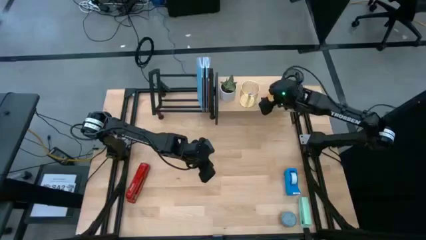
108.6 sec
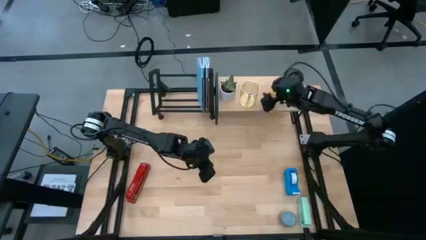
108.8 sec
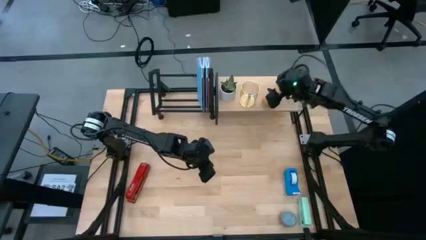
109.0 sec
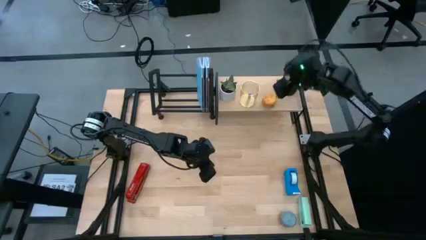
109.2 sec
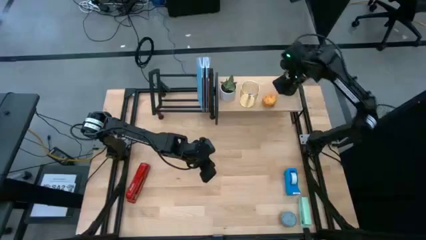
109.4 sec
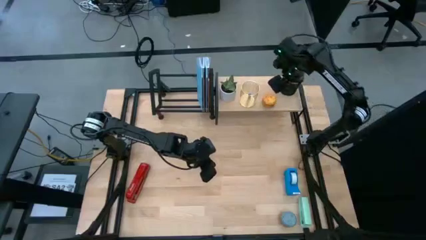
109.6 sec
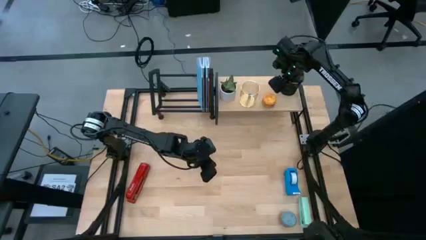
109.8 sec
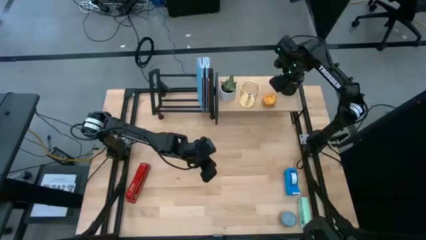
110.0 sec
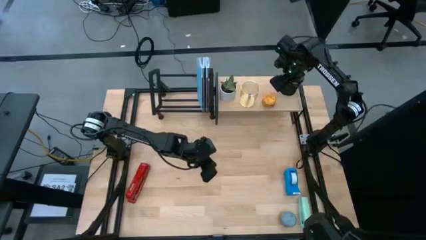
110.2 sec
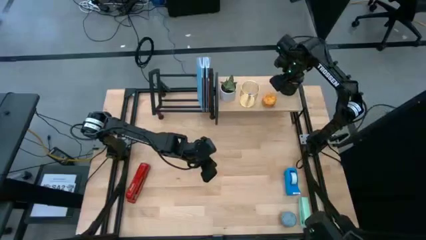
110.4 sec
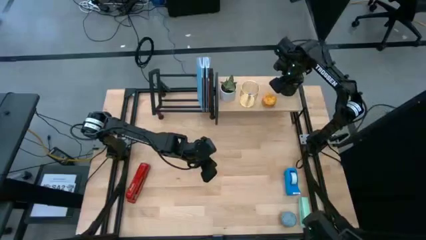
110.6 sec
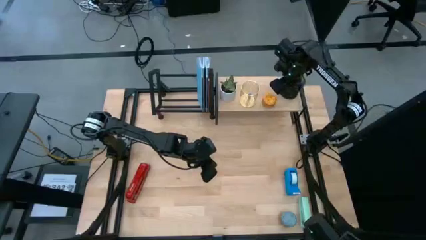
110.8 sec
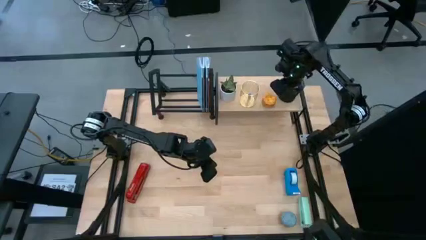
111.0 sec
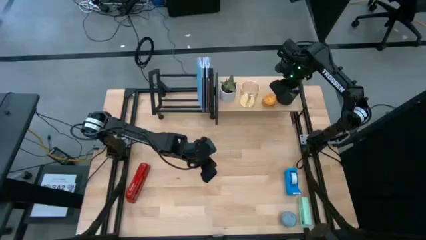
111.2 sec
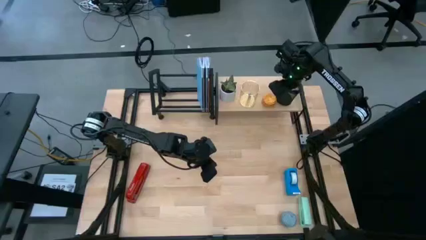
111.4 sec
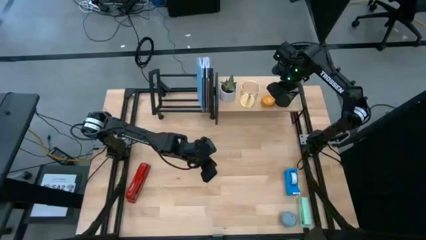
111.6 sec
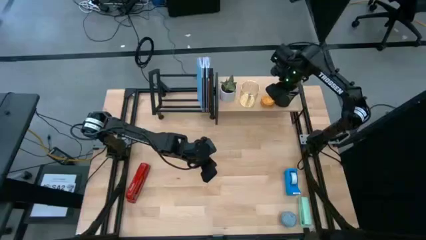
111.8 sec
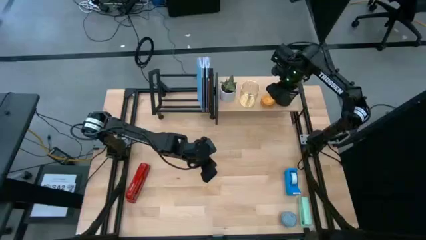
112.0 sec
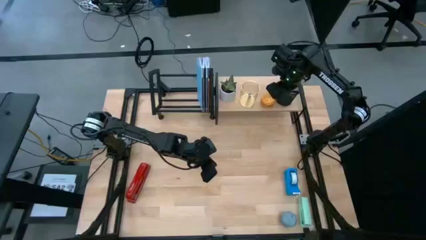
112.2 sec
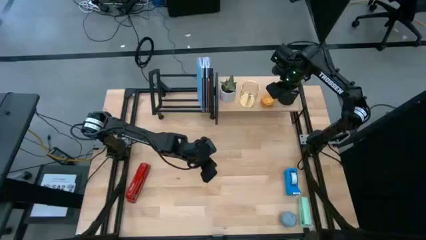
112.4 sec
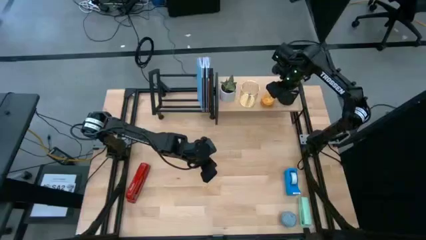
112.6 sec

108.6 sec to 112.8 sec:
Task: Stock shelves
Adjust the black pen organizer

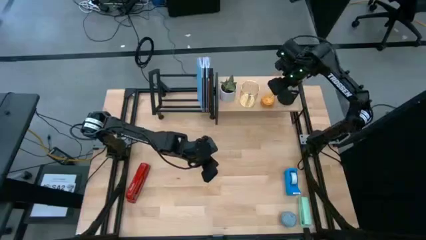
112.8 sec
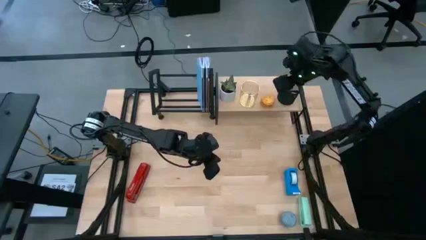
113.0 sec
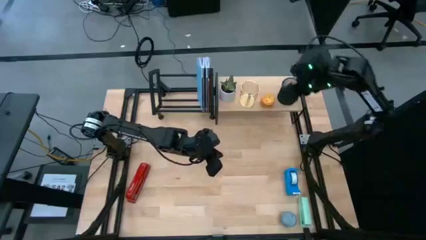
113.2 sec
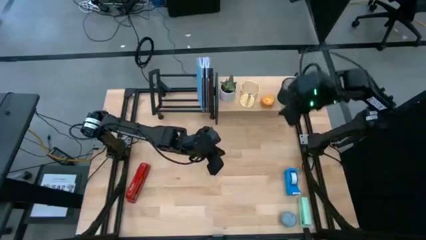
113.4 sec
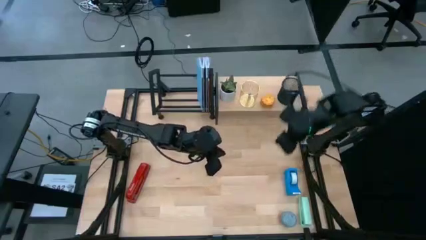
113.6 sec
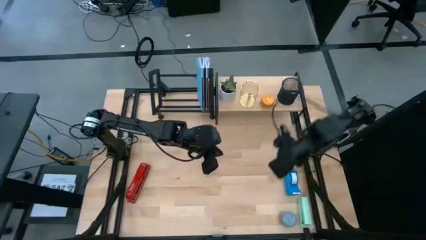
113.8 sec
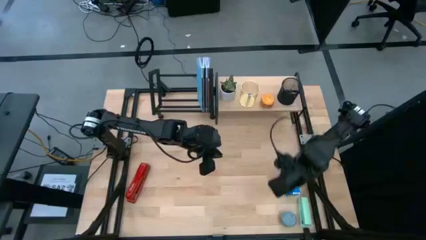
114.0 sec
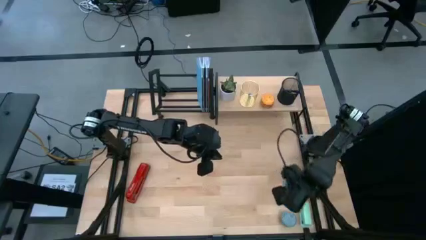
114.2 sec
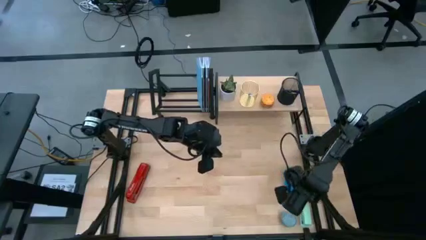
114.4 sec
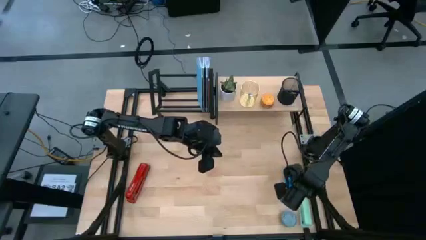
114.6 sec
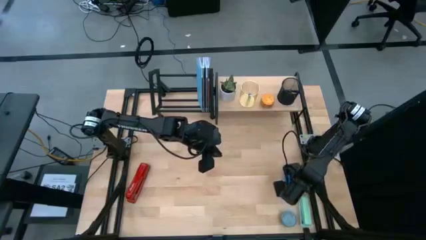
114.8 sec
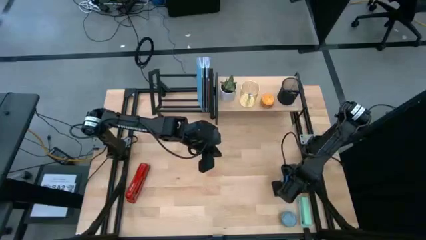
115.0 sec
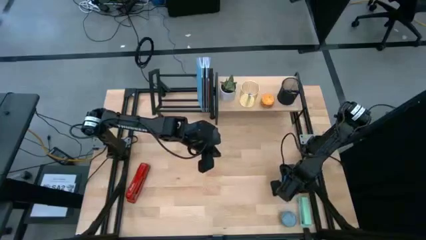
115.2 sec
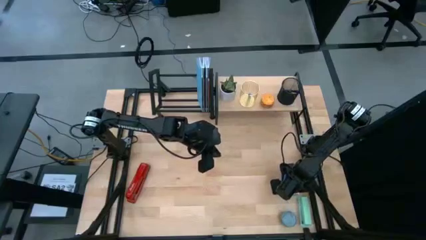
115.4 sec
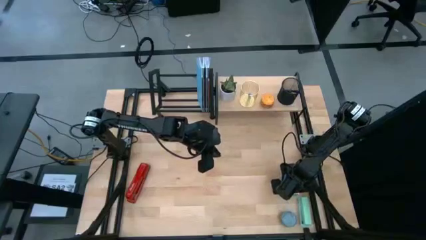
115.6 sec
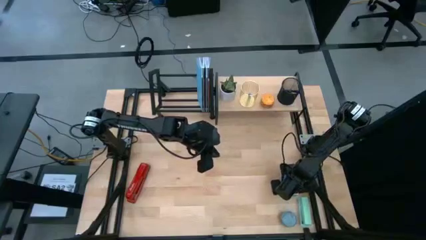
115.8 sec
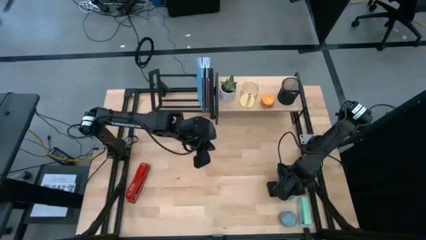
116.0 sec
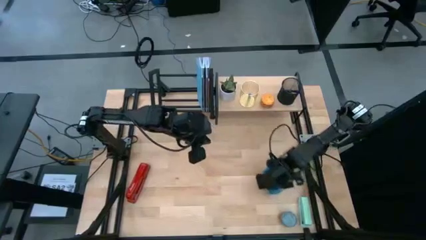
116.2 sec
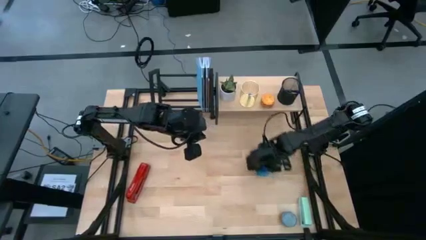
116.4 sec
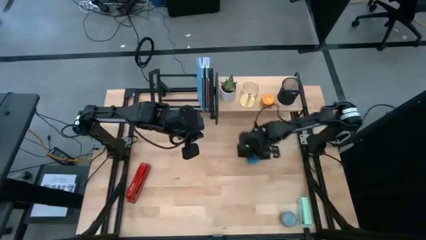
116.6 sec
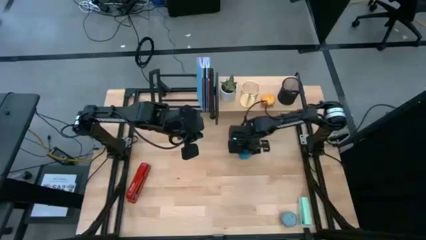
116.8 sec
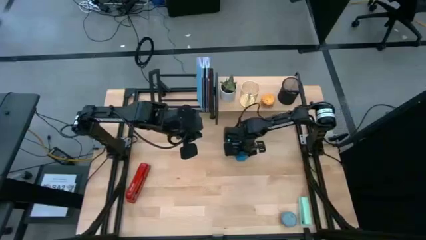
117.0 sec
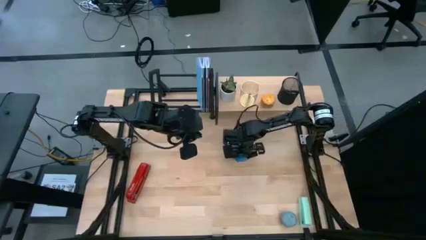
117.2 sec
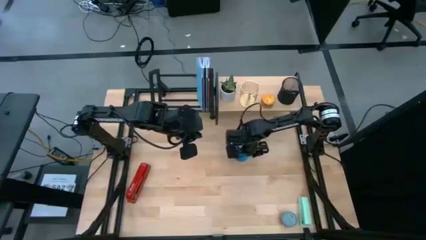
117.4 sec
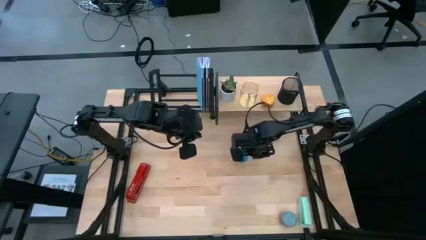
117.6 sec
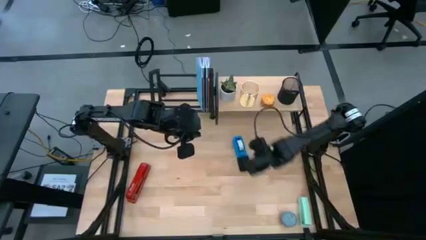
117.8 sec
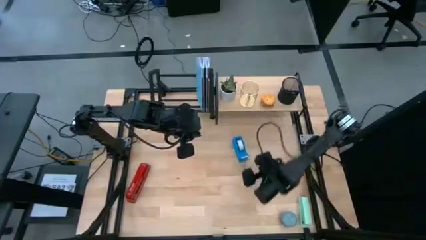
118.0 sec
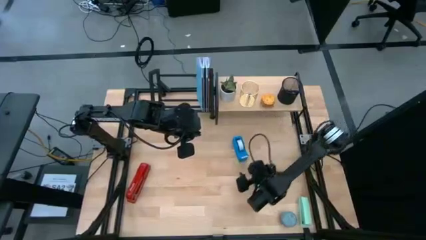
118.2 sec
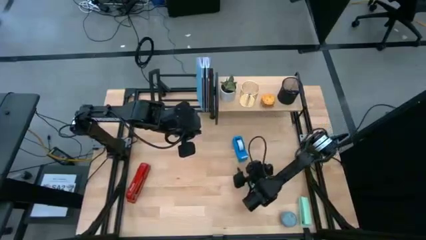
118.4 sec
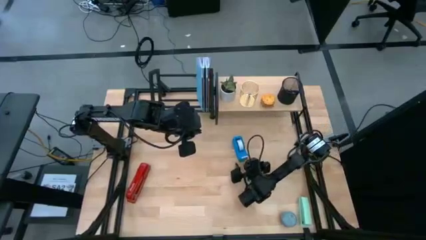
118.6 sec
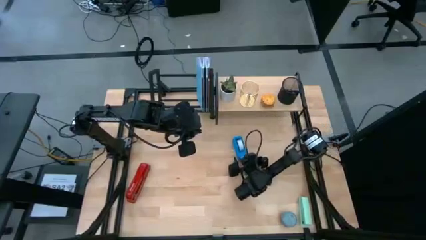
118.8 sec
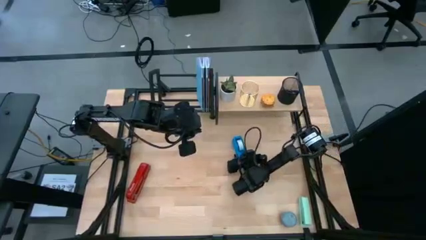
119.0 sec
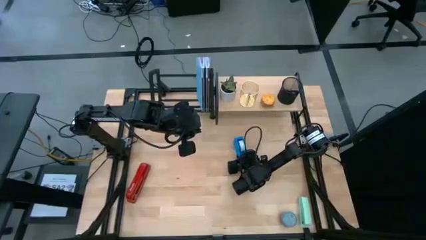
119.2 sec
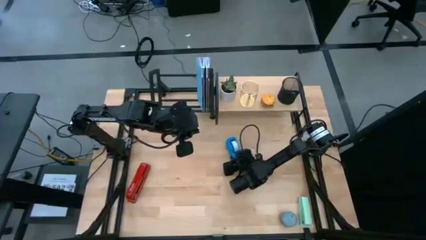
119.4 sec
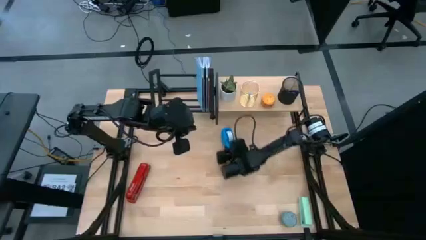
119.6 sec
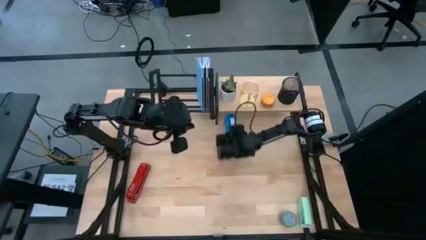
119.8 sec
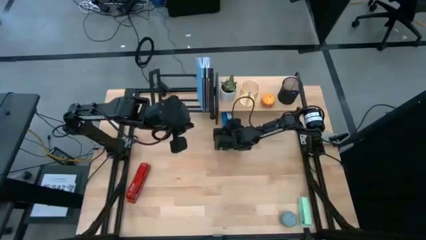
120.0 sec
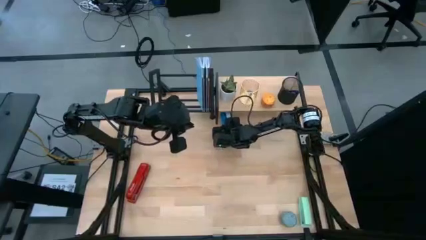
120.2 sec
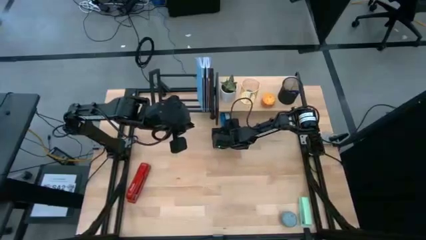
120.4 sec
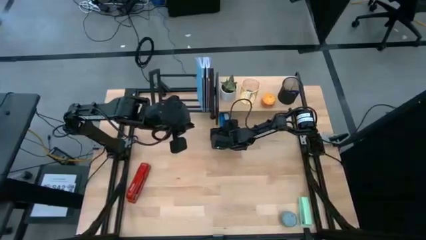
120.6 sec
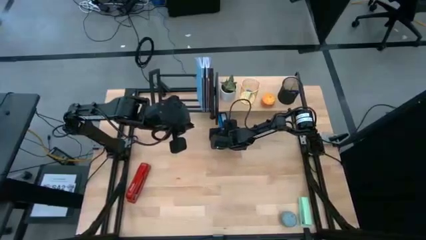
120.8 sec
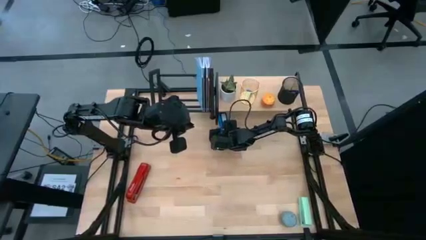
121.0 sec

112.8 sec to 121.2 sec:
Put the blue tape dispenser under the shelf

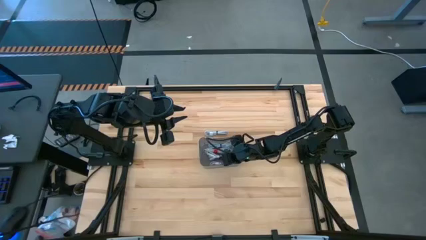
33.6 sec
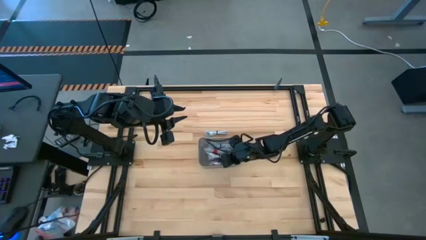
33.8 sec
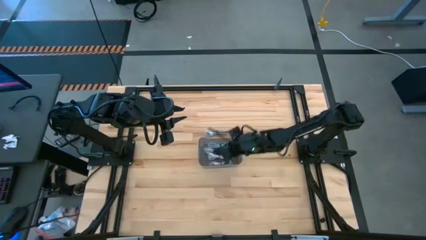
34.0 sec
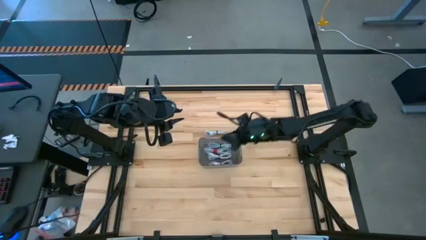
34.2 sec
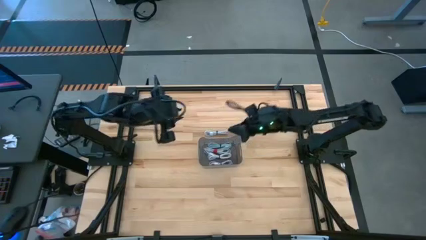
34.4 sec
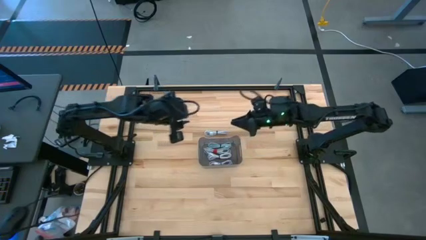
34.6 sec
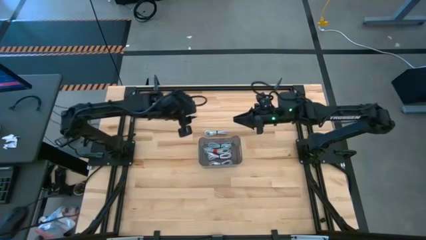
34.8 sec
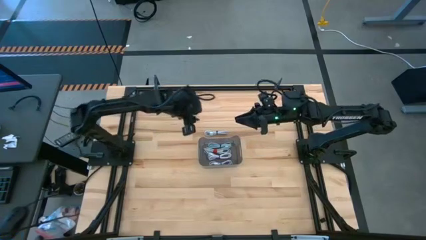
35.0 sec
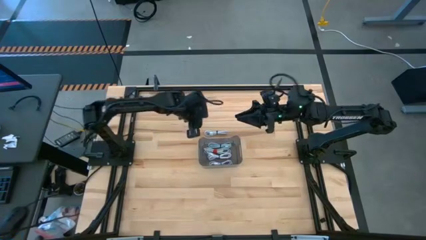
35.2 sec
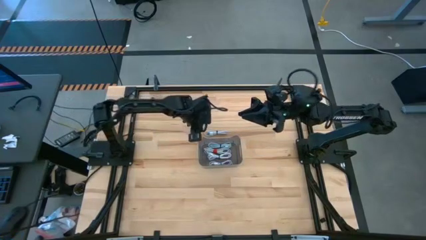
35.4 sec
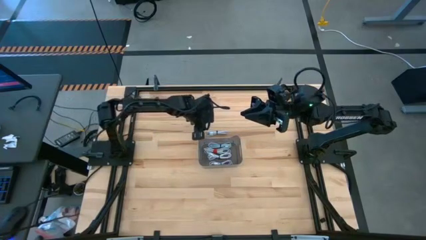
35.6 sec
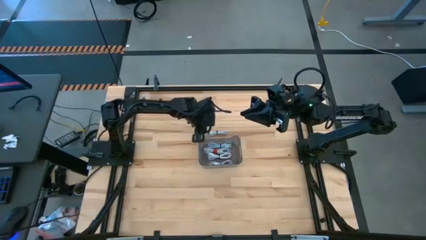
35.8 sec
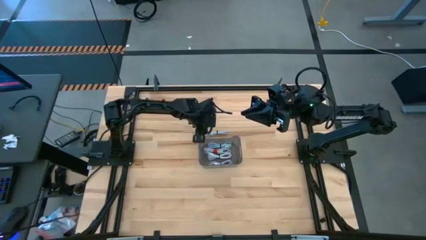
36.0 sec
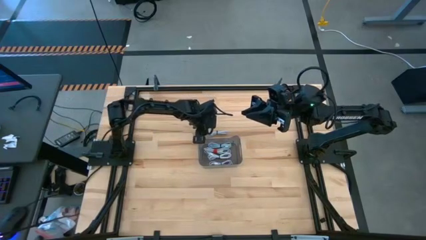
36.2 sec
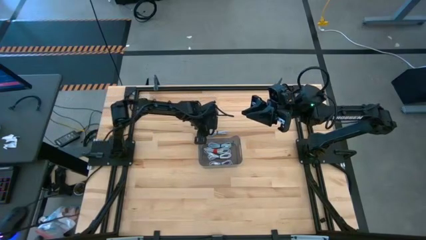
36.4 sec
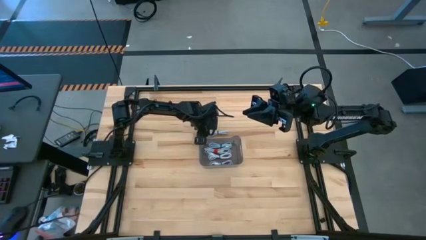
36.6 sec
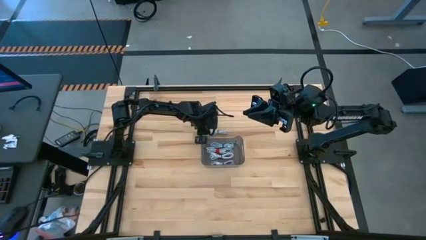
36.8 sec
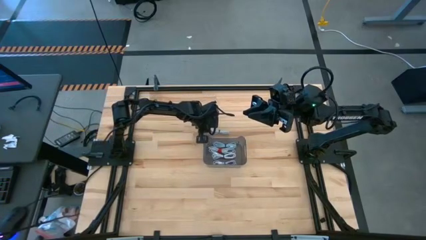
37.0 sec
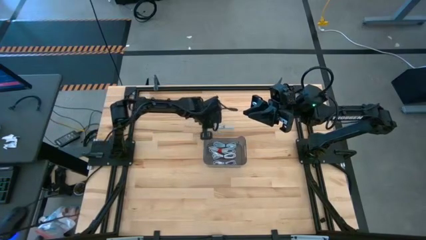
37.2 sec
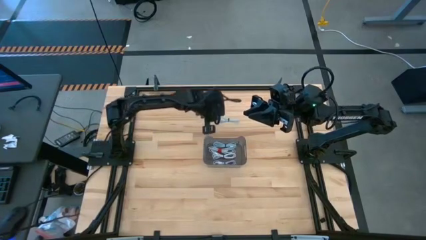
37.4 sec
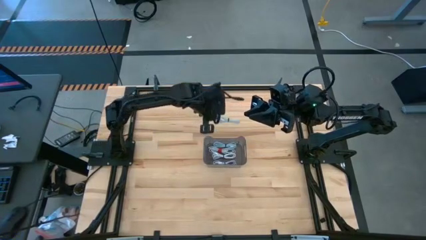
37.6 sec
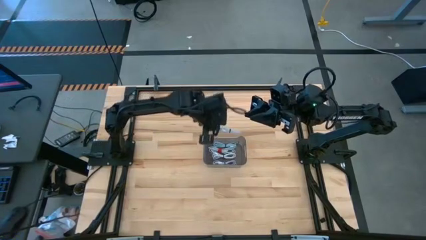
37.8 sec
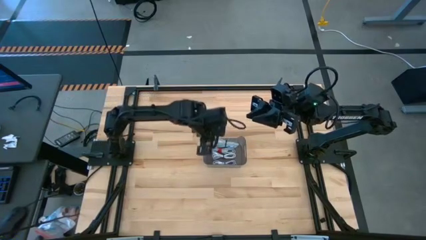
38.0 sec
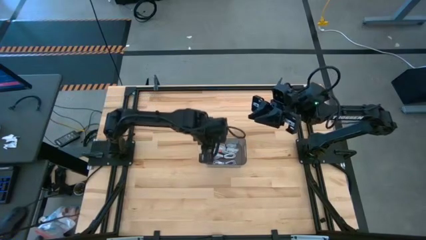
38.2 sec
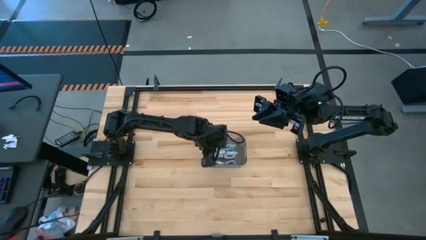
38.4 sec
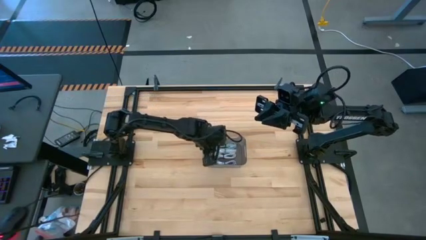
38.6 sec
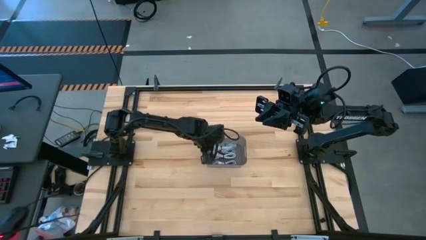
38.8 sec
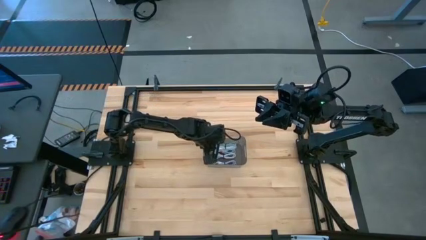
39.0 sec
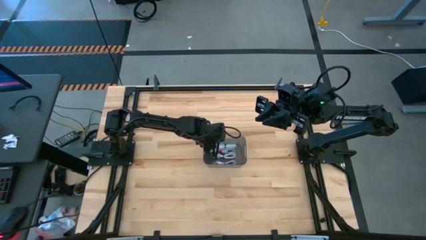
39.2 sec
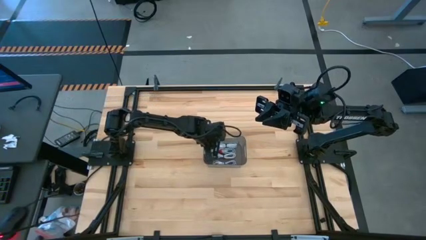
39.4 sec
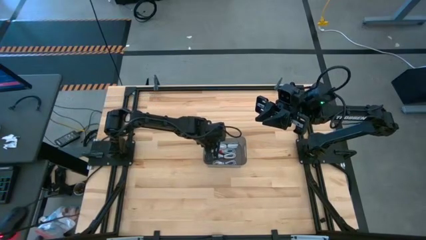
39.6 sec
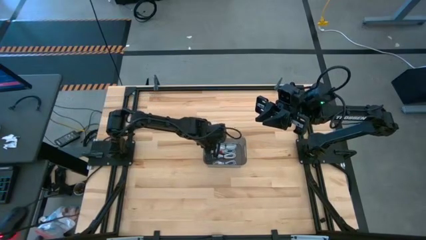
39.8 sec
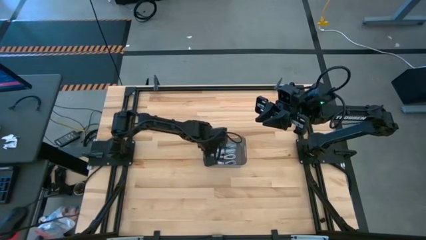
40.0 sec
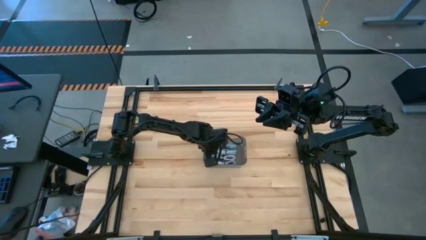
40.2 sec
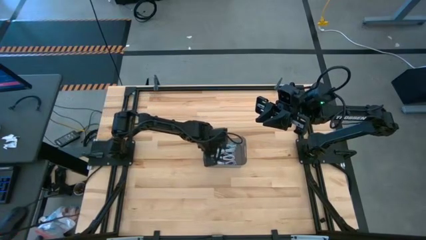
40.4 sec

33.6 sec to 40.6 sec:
Task: Pick and place USB-C Cables
Put the white charger cable in the black bin
